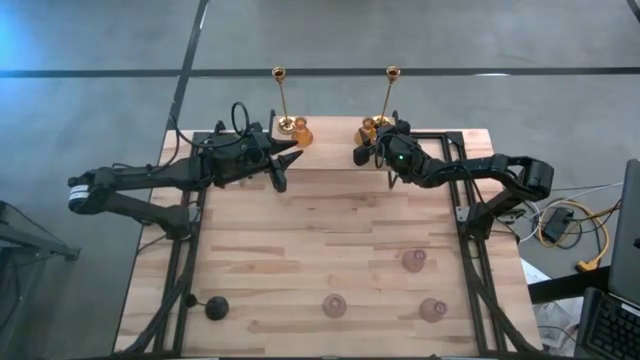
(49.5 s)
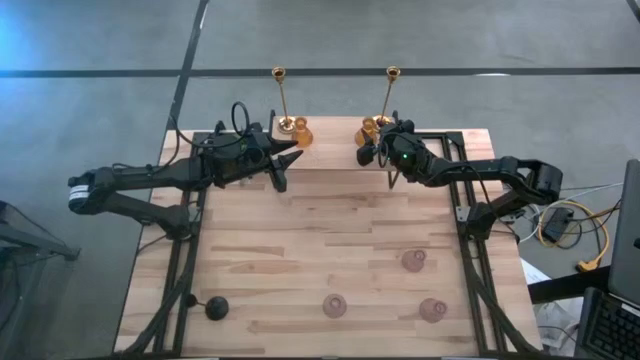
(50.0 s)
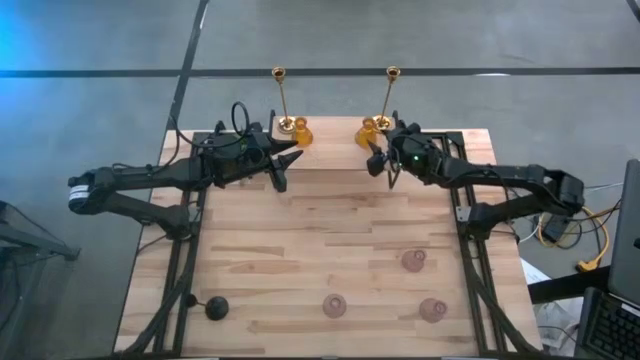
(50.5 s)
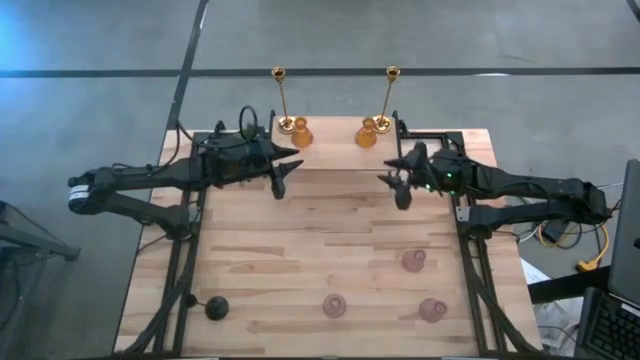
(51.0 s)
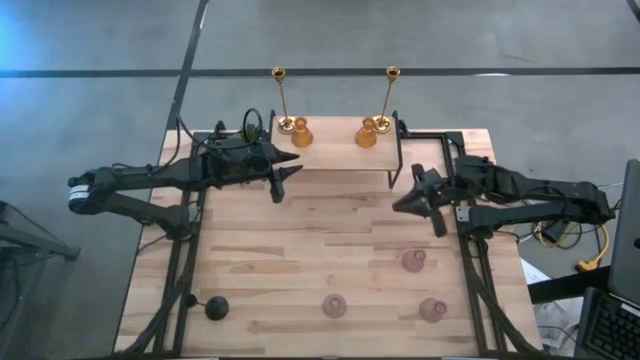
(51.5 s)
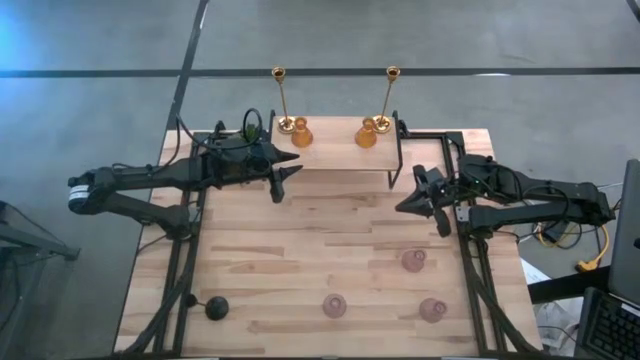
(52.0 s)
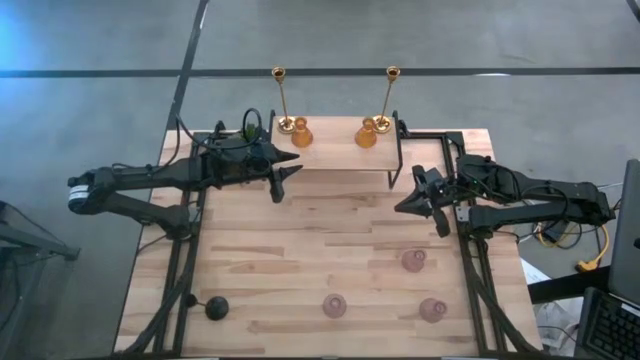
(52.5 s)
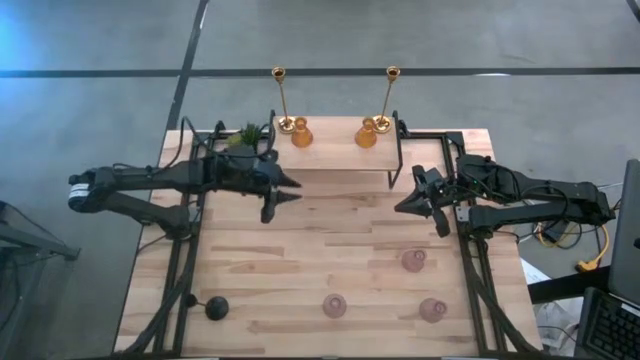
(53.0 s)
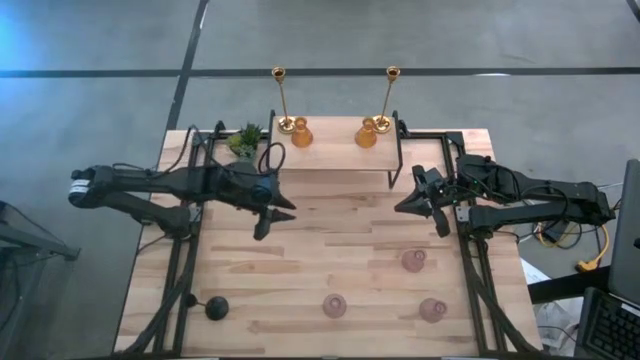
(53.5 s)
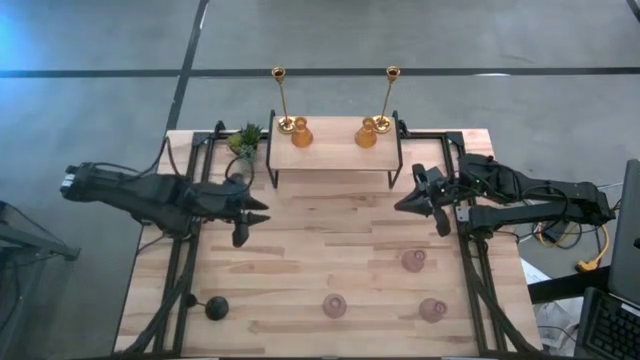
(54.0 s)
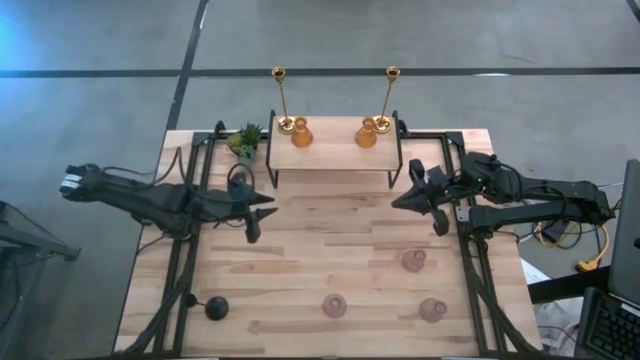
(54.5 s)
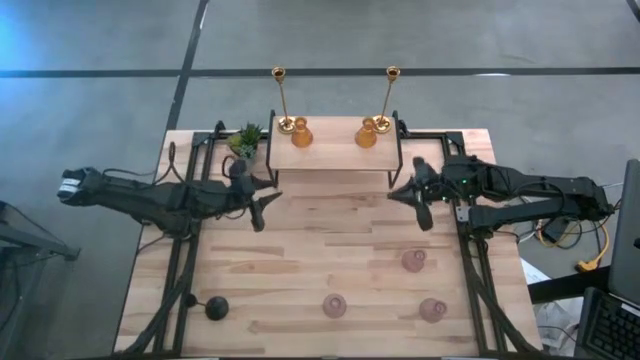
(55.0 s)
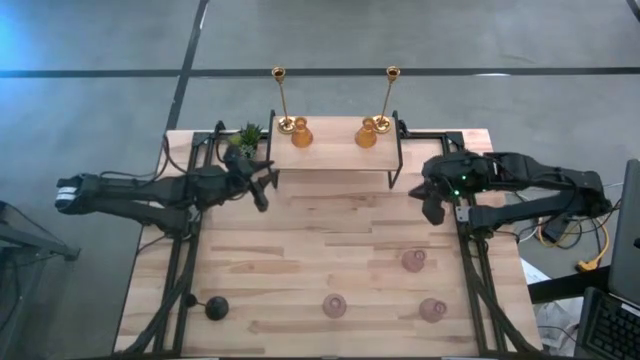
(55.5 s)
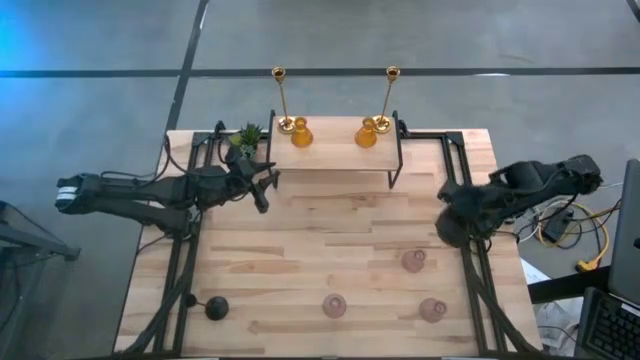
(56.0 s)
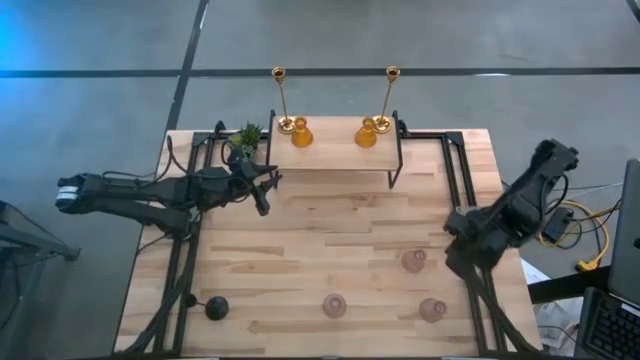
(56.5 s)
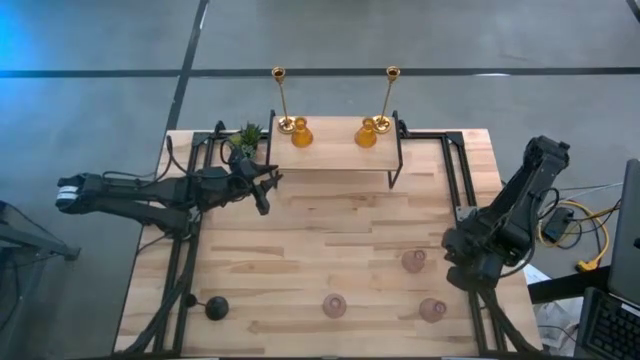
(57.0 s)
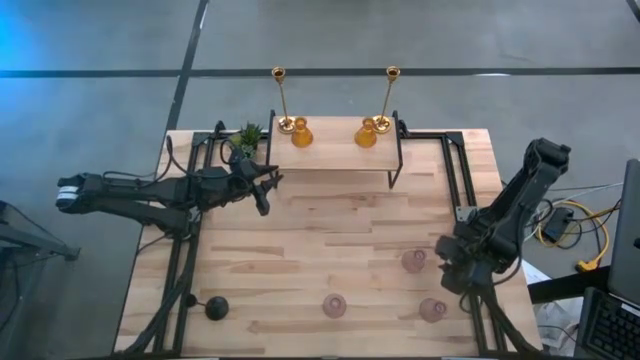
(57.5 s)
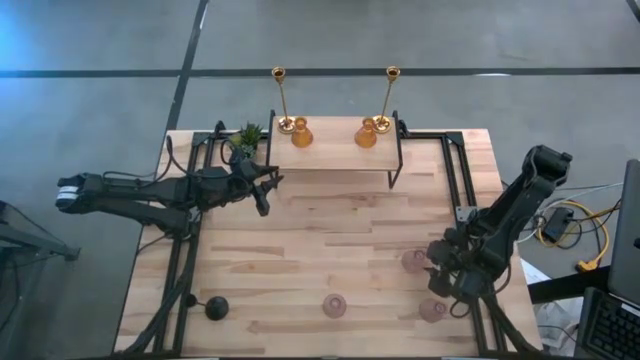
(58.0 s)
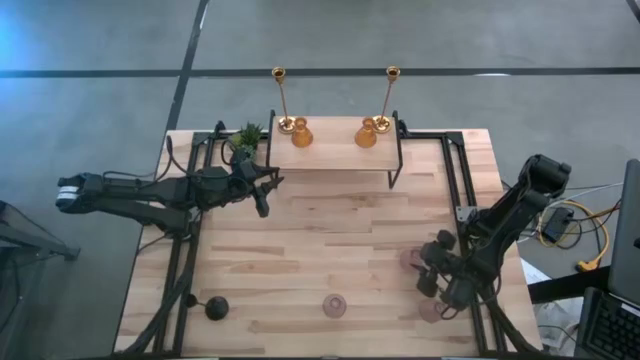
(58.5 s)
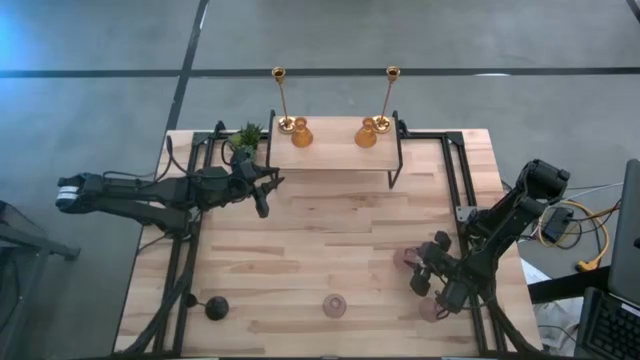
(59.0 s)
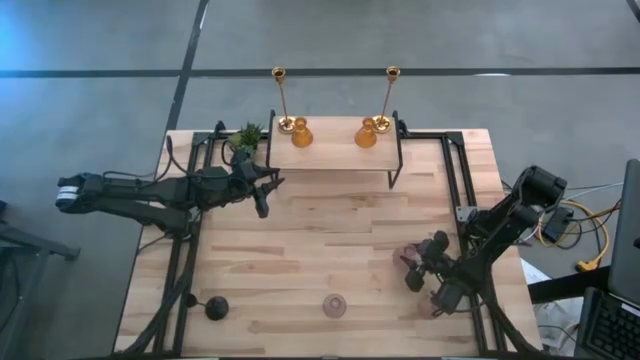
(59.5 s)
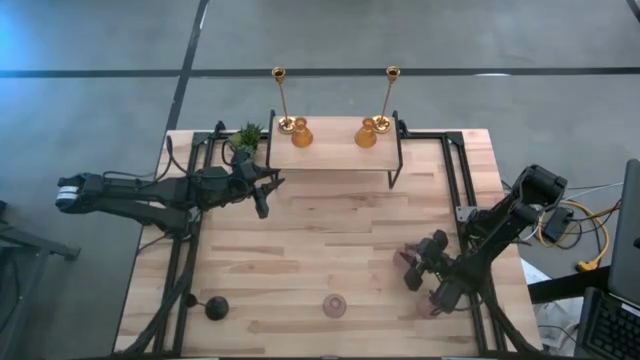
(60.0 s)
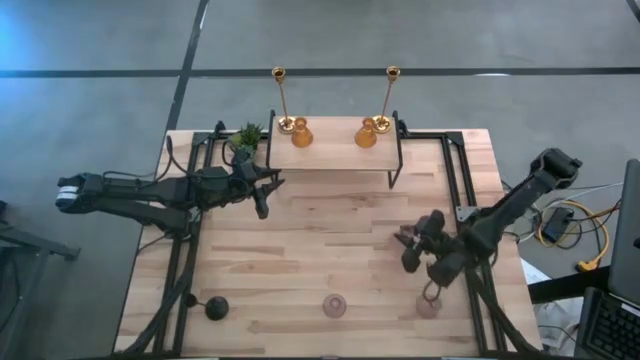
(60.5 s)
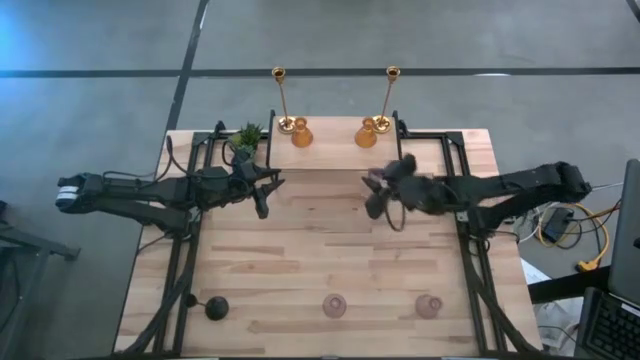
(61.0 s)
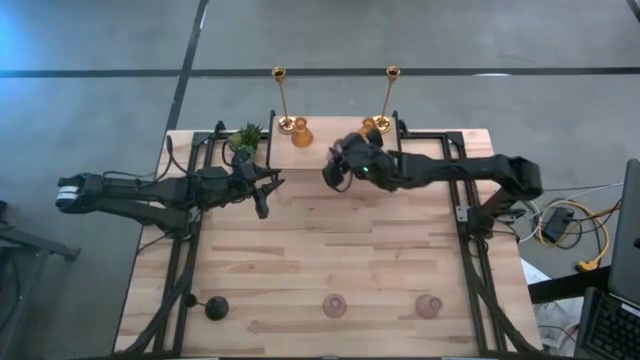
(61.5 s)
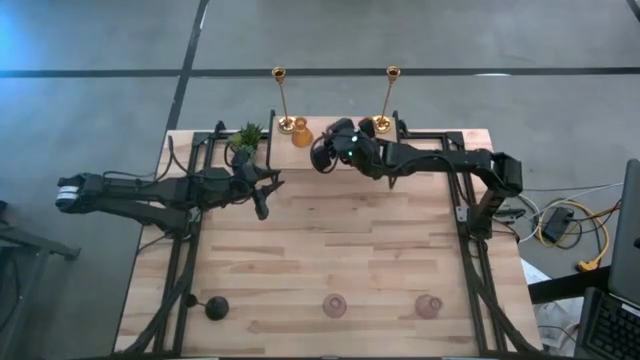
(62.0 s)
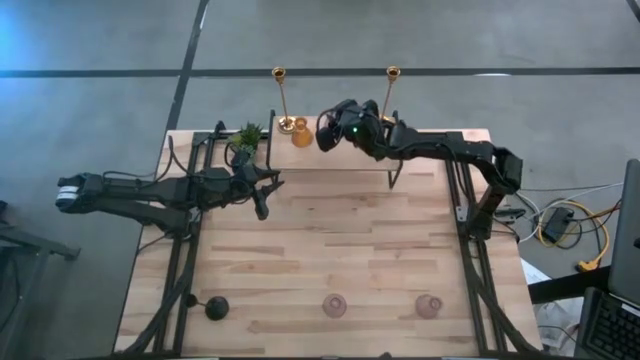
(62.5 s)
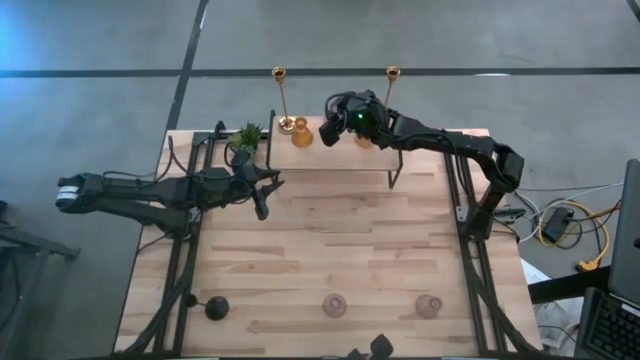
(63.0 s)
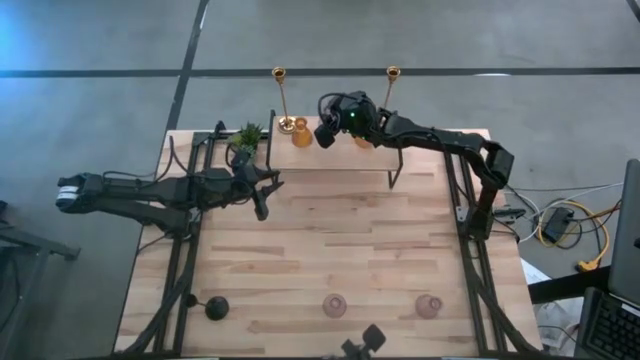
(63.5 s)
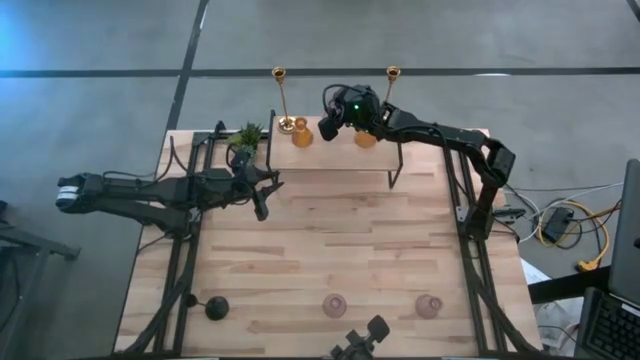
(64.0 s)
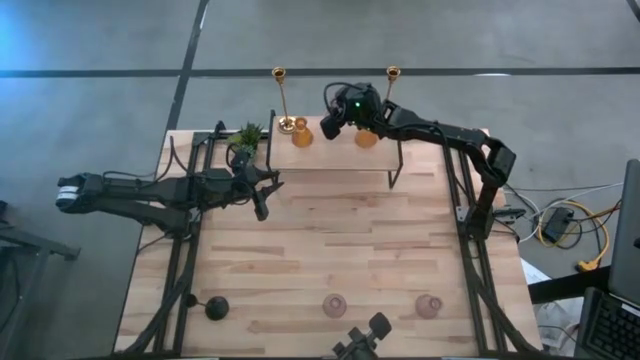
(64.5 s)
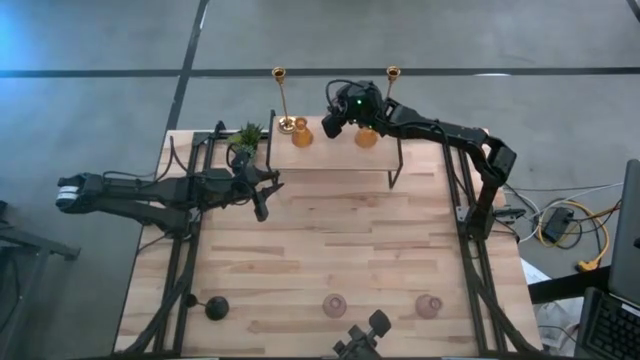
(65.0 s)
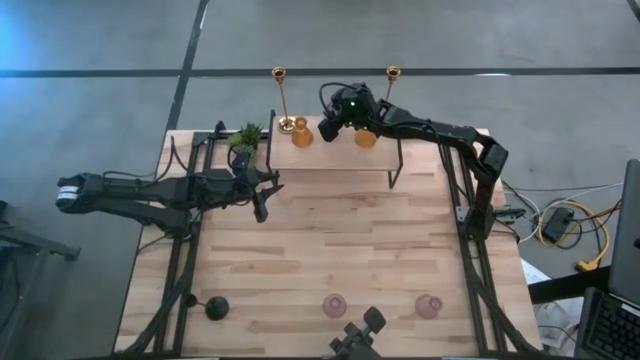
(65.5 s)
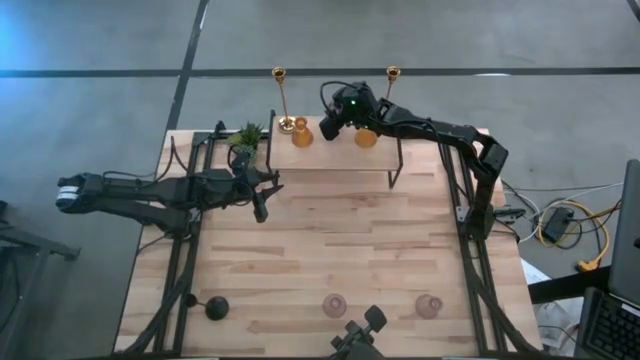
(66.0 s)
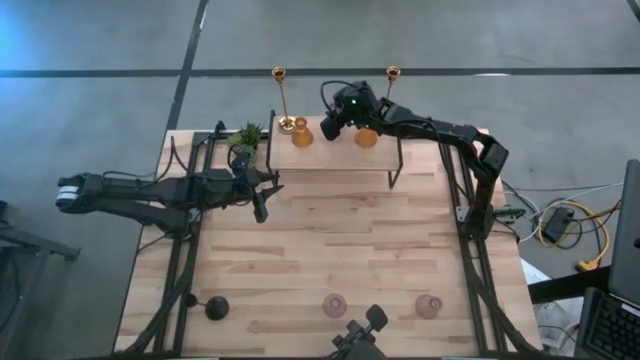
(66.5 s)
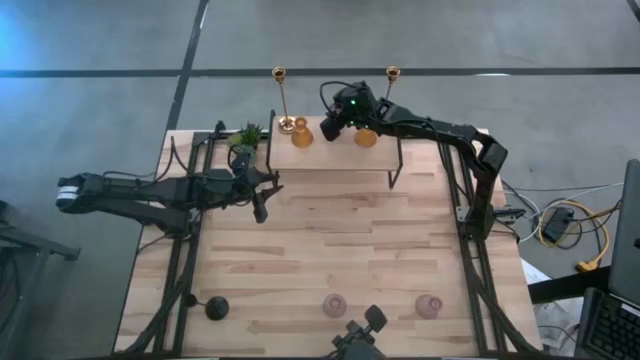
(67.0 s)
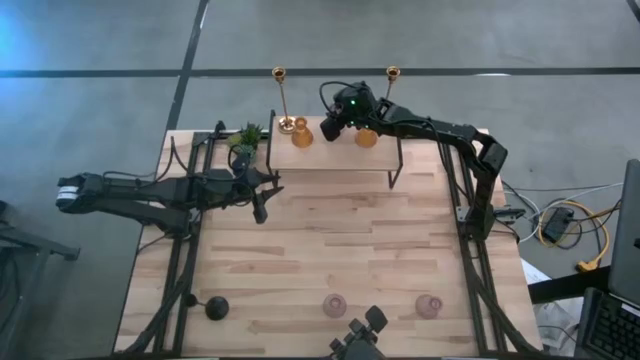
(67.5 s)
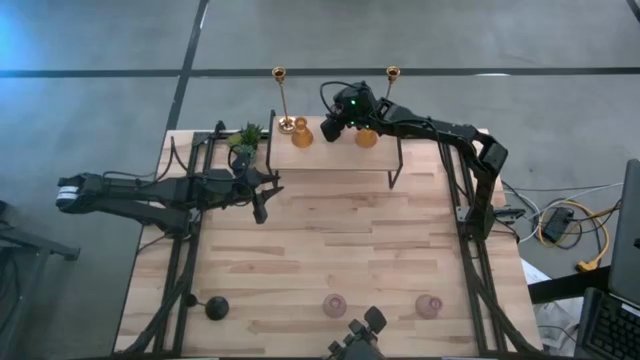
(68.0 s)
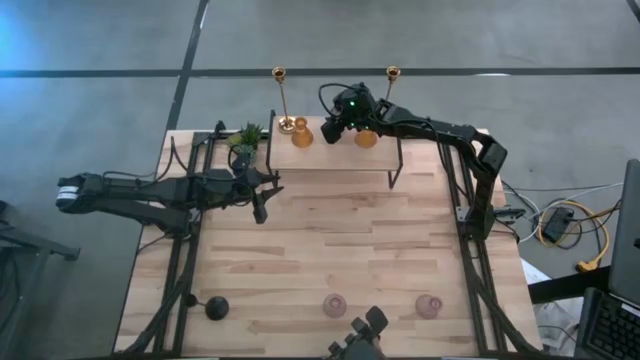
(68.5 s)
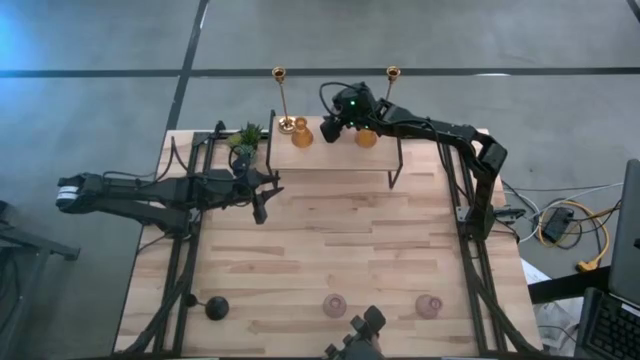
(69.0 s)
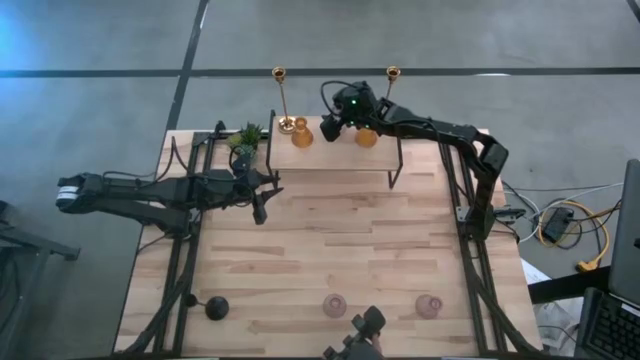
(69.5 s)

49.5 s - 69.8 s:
Task: Pick & Place candle stick holders
Put the top right pink glass candle holder on the shelf
